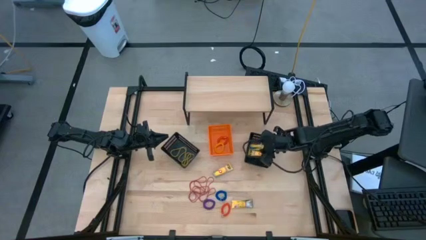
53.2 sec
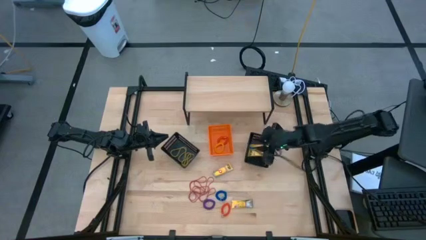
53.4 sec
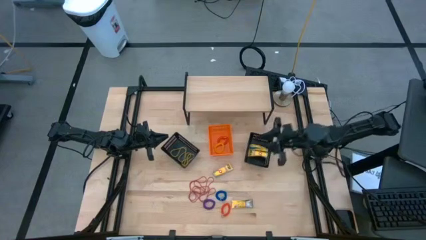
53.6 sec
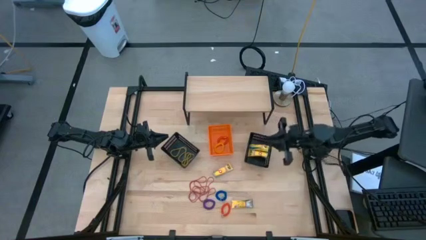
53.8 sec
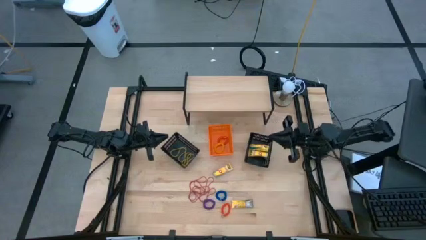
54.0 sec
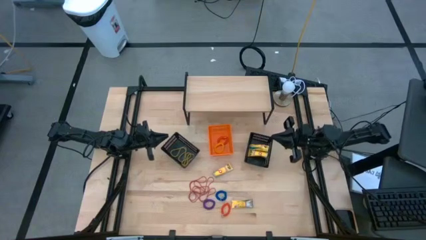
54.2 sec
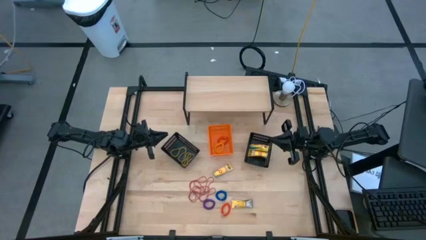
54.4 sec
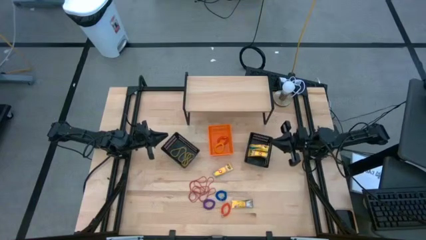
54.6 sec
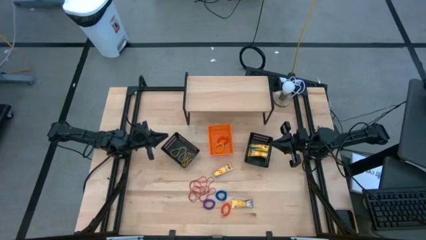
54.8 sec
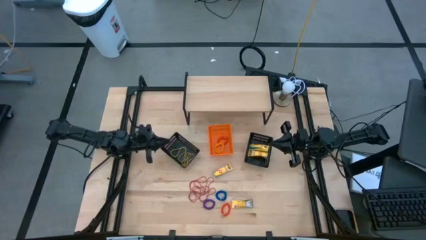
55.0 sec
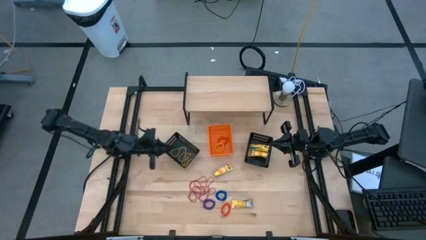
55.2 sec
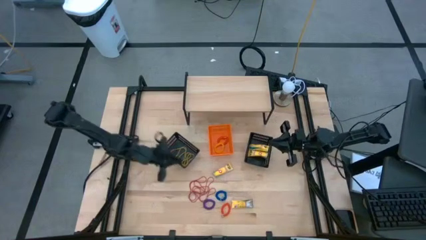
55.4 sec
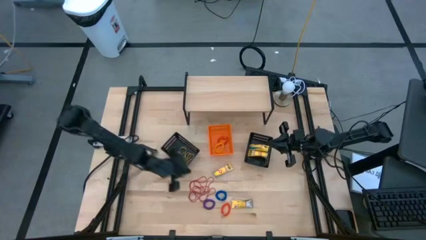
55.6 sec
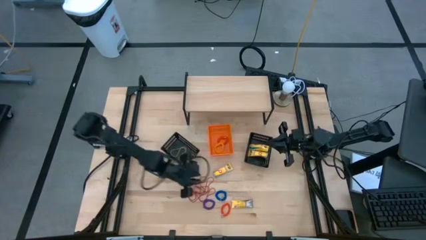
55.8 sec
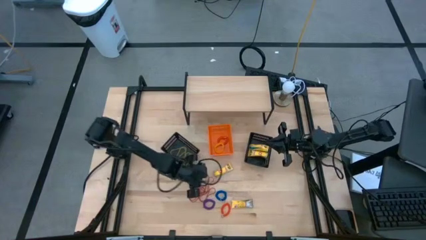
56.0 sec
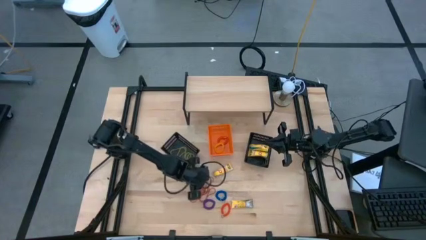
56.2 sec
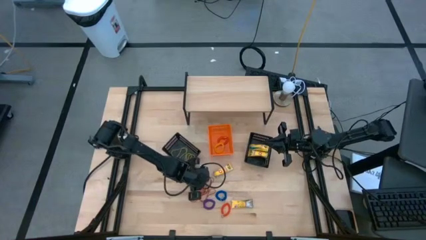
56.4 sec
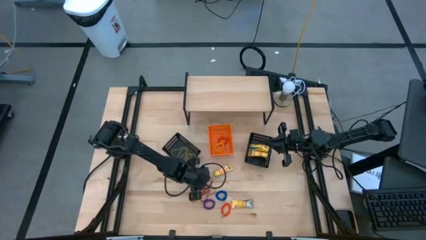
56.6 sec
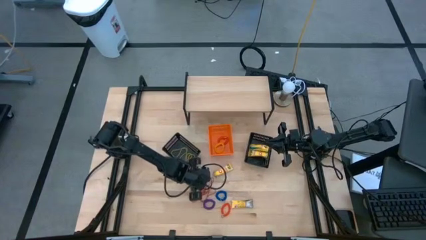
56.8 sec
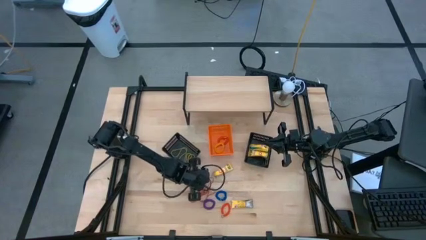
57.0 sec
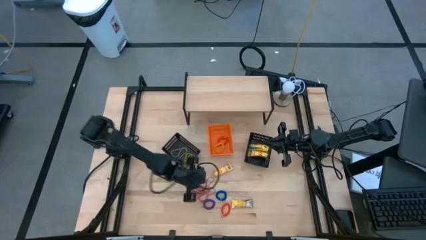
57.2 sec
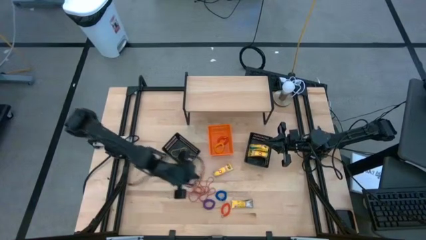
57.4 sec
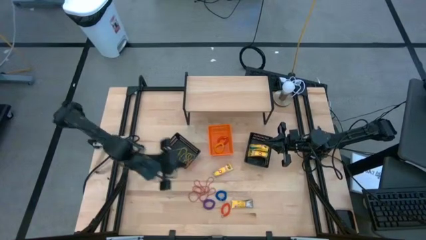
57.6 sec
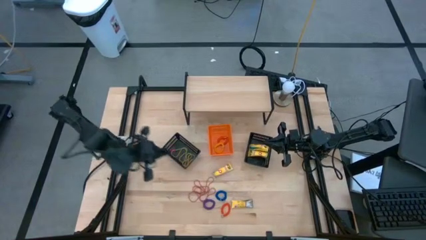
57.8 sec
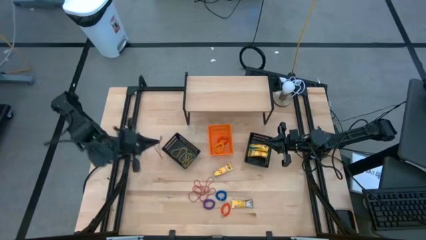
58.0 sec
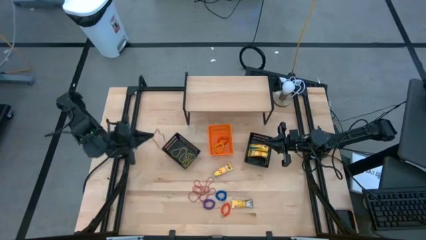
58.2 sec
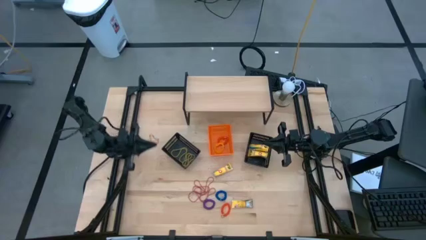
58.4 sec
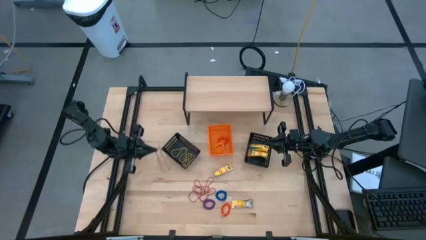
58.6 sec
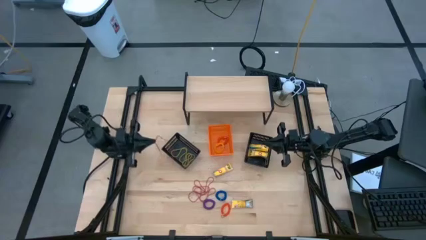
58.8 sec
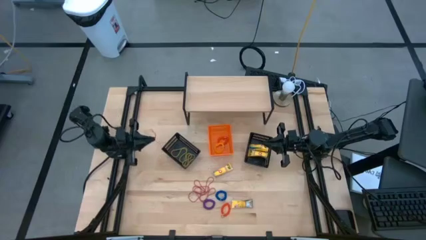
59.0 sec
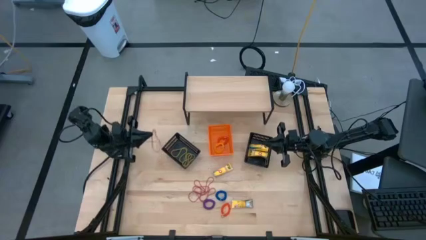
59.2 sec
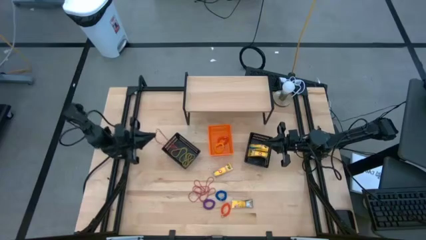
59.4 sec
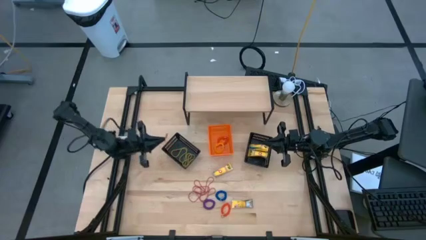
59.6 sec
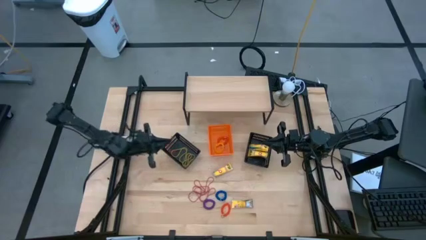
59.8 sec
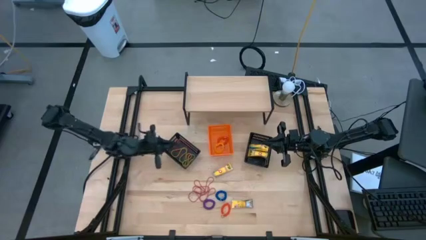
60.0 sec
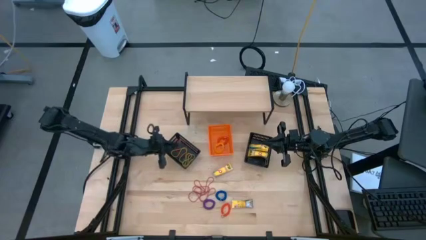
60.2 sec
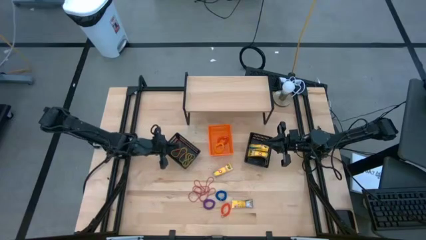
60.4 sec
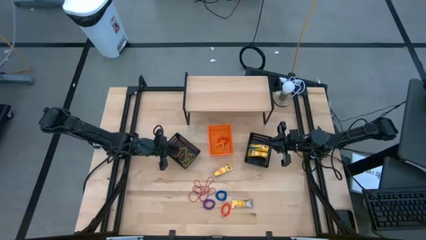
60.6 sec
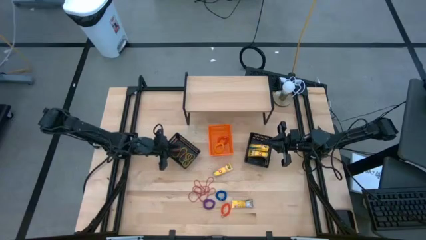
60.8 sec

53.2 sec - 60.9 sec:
Task: Pick & Place Office Desk Supplies
Put the red rubber band into the left black bin

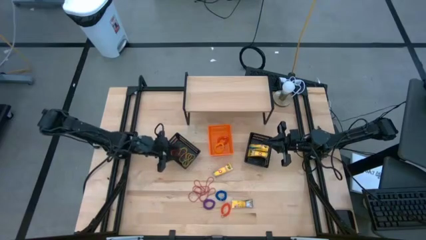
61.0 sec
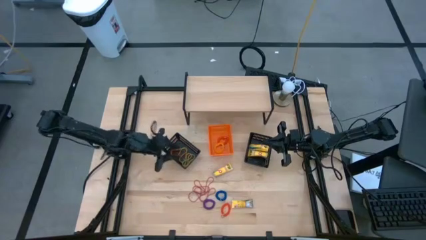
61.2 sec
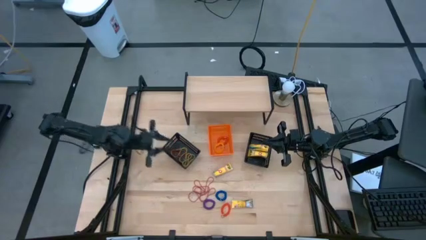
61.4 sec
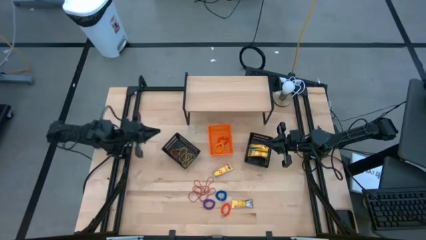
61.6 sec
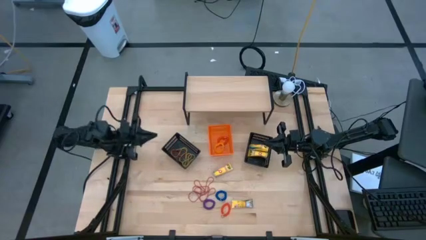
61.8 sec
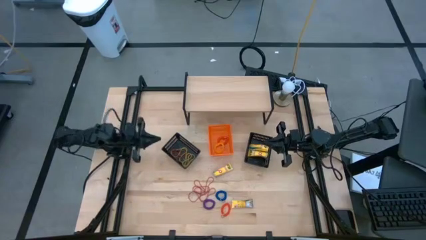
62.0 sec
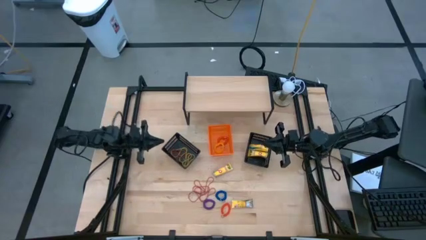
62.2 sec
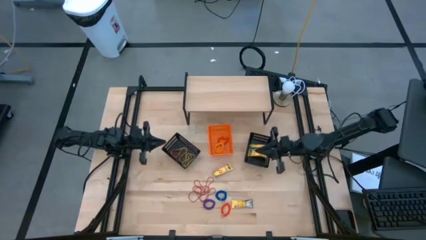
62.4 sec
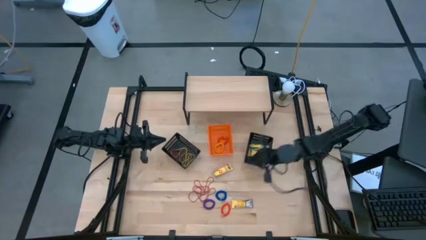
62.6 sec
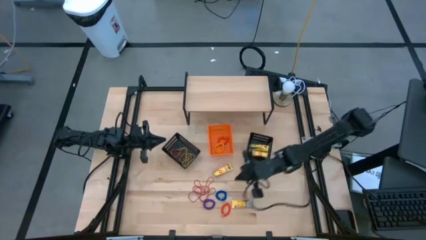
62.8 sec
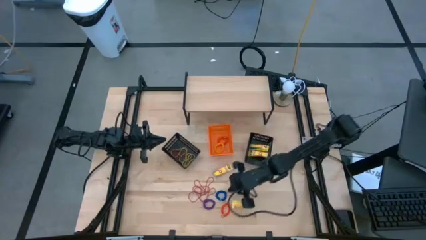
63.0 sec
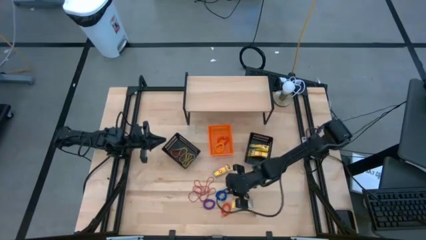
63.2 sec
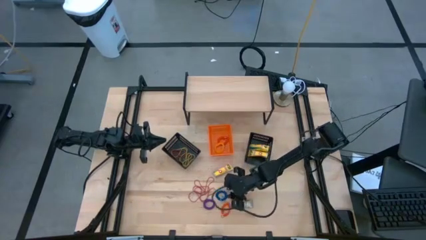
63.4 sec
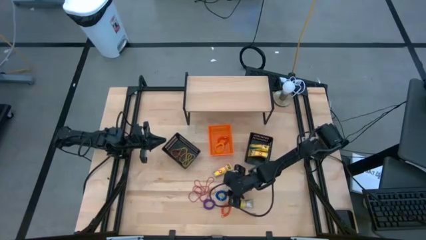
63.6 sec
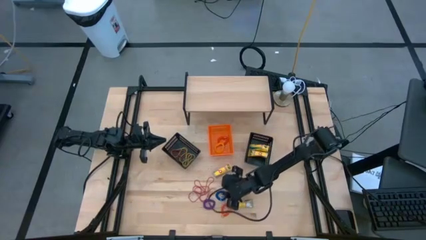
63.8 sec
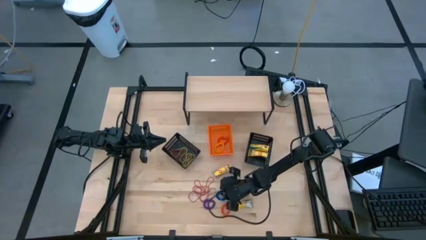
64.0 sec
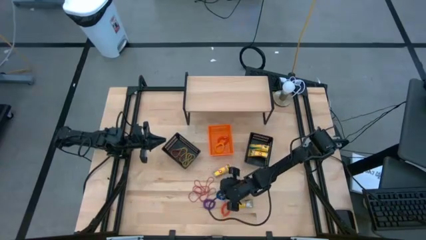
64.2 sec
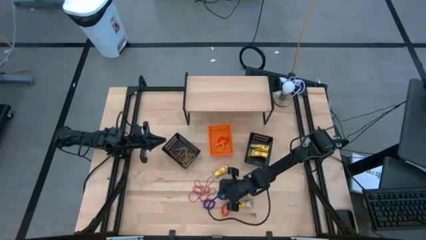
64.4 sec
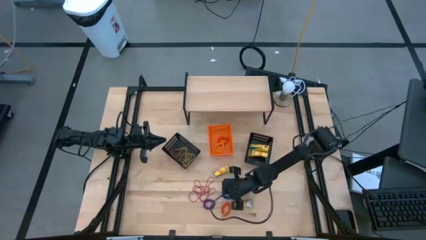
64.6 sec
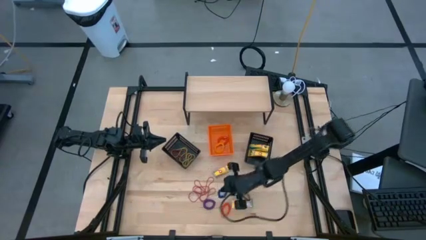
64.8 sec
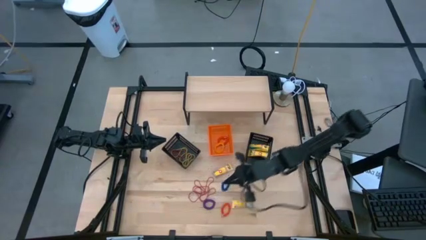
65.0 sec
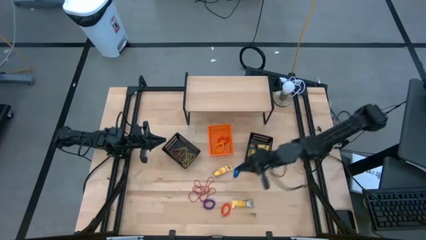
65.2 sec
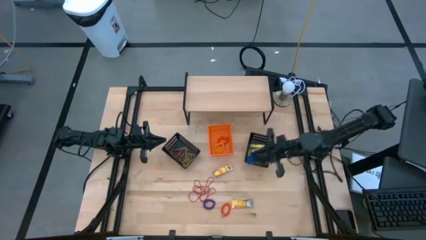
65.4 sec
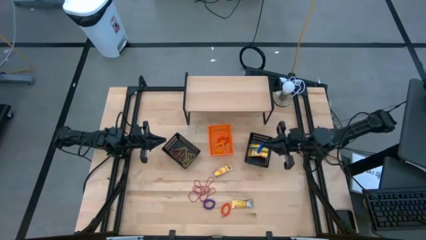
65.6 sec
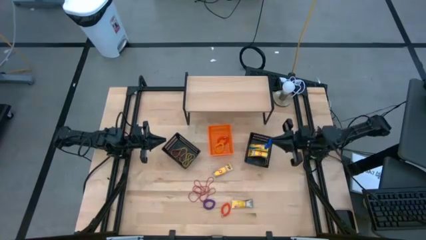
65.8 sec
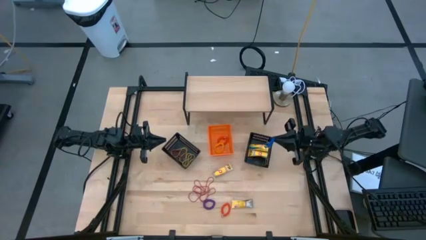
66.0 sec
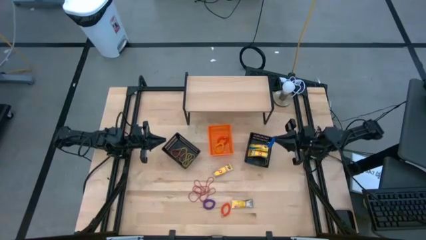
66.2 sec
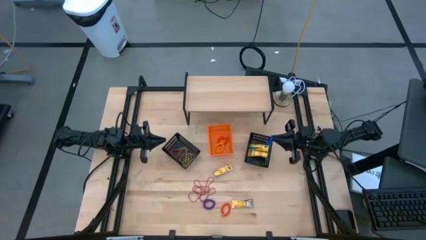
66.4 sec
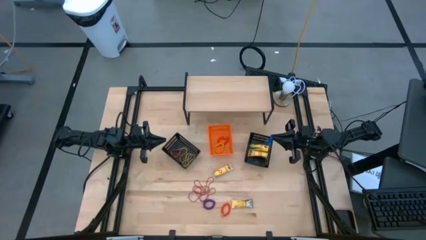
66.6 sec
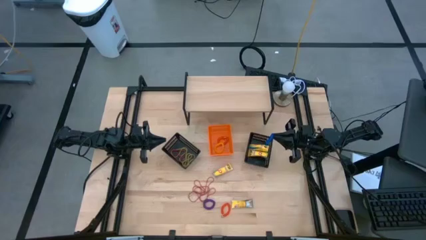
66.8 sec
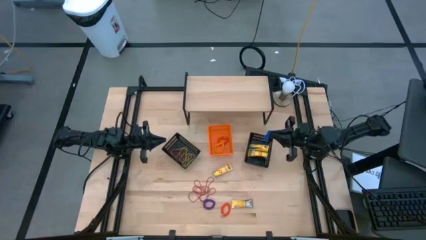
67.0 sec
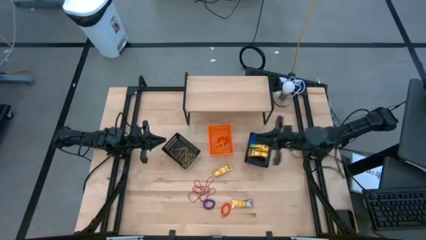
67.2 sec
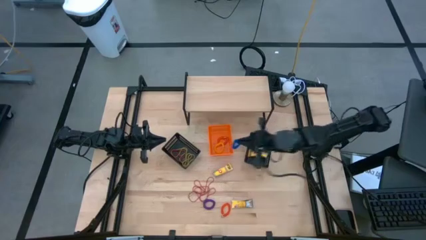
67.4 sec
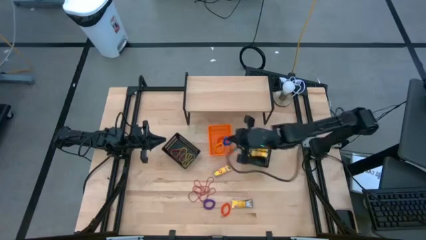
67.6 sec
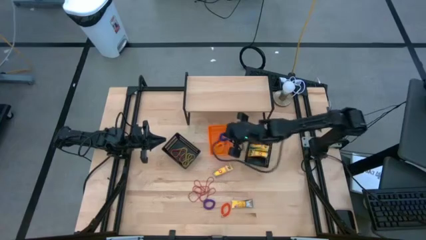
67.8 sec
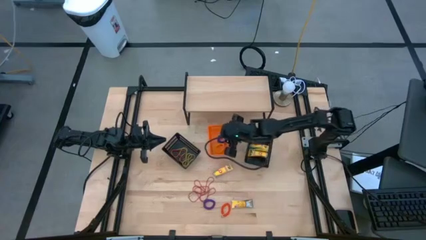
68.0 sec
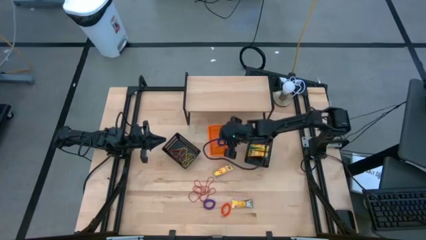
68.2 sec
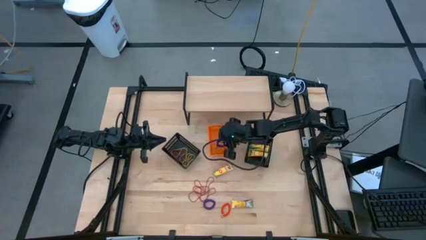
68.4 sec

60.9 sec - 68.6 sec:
Put the blue spring keychain into the orange bin
